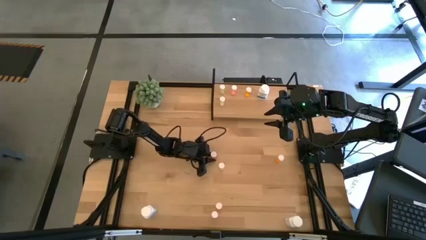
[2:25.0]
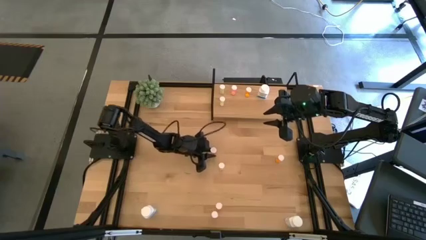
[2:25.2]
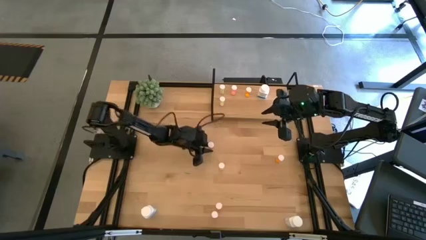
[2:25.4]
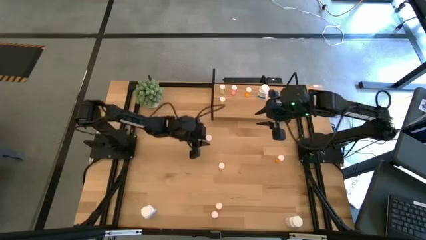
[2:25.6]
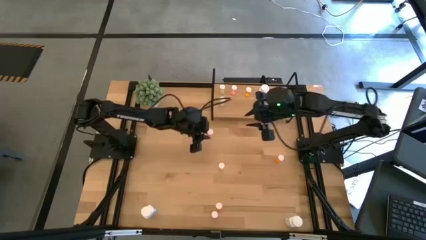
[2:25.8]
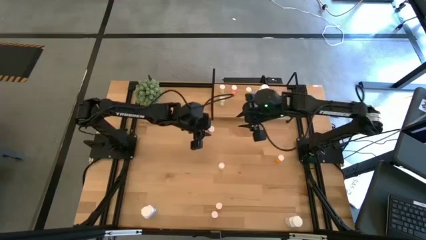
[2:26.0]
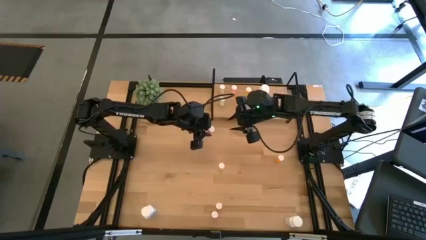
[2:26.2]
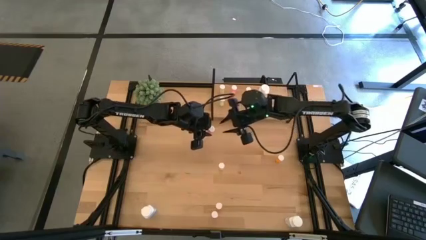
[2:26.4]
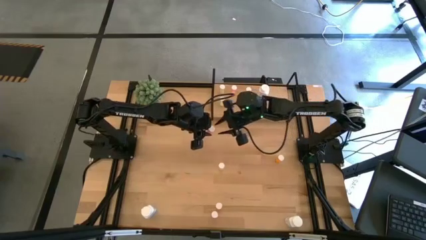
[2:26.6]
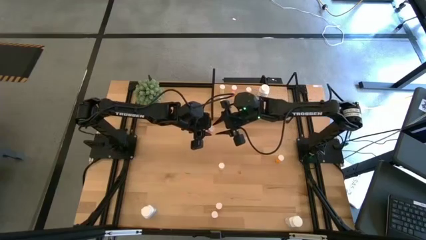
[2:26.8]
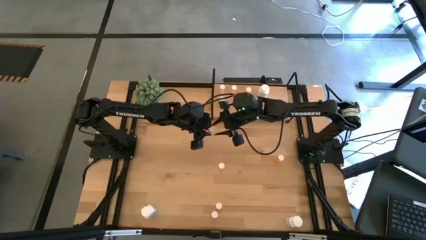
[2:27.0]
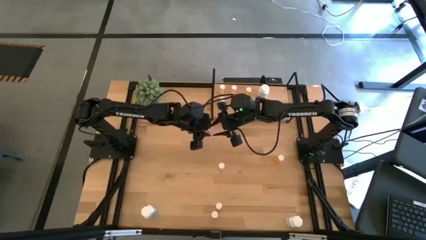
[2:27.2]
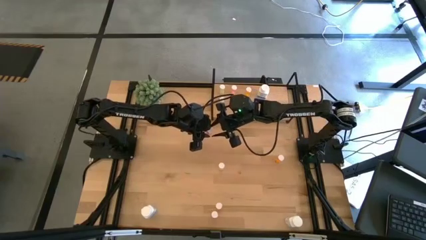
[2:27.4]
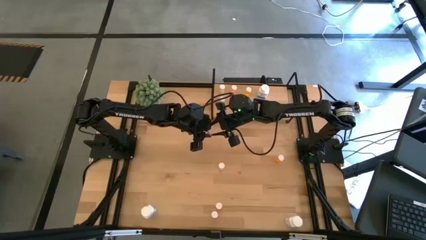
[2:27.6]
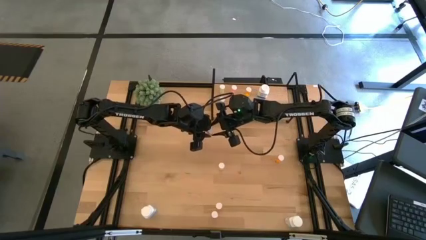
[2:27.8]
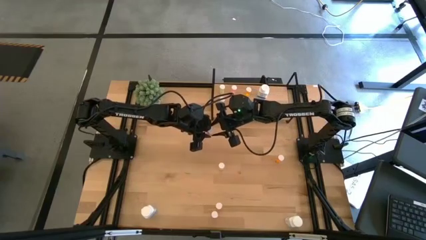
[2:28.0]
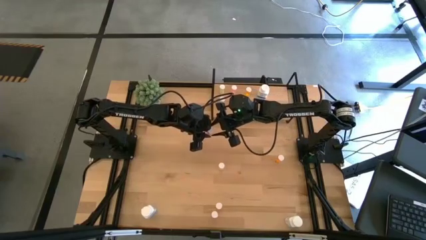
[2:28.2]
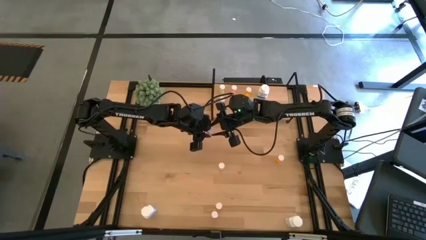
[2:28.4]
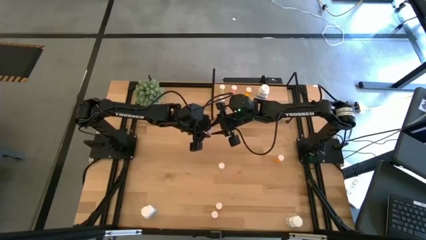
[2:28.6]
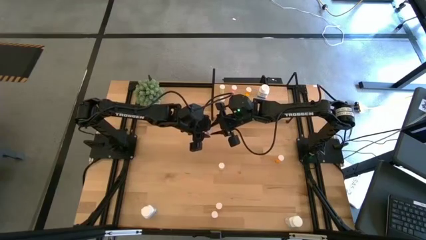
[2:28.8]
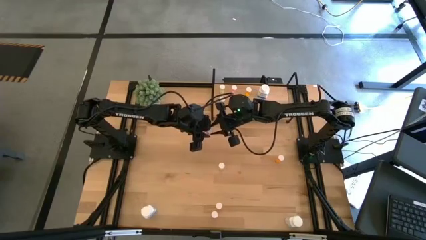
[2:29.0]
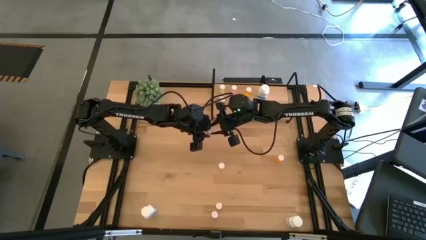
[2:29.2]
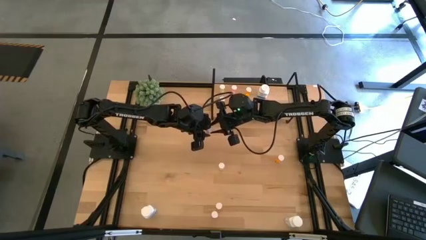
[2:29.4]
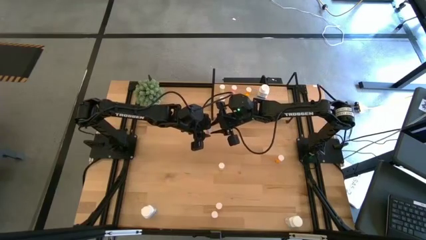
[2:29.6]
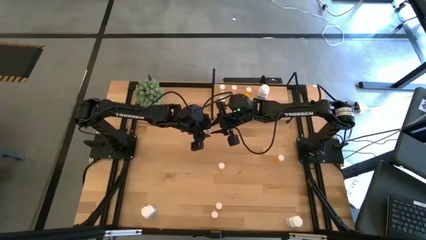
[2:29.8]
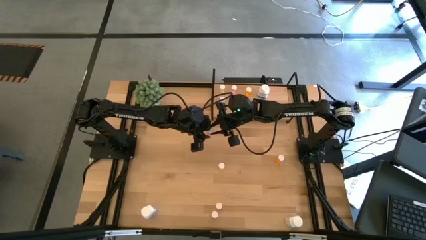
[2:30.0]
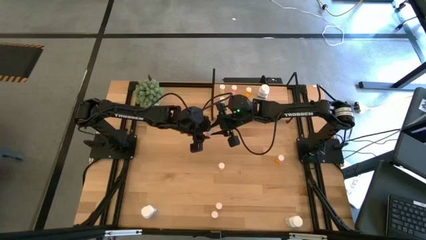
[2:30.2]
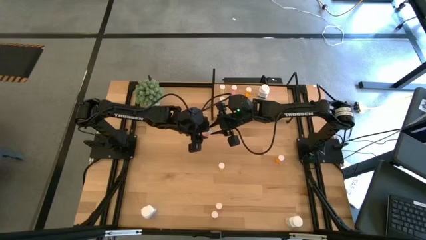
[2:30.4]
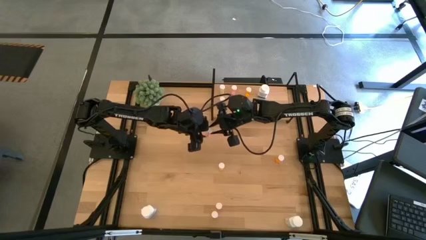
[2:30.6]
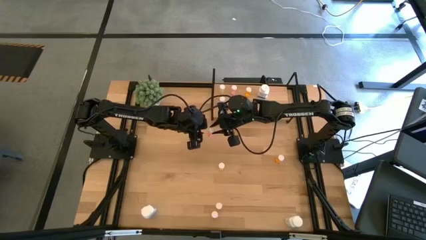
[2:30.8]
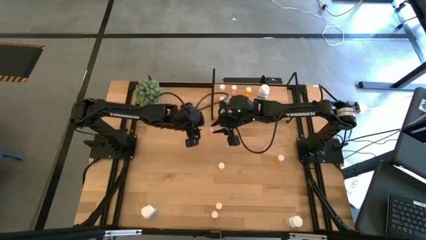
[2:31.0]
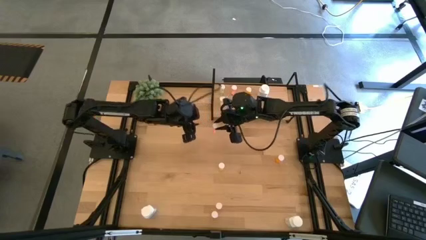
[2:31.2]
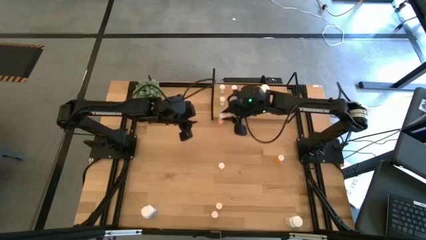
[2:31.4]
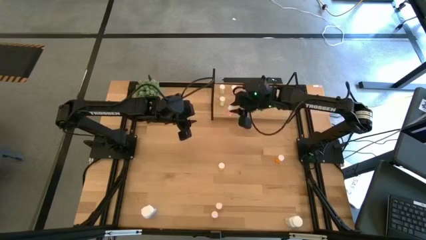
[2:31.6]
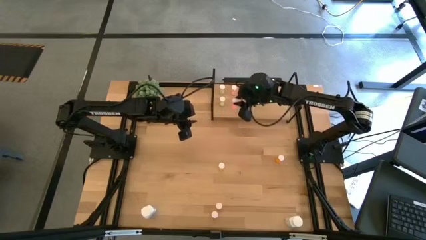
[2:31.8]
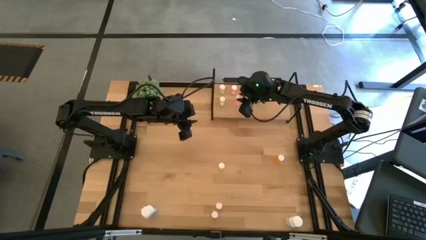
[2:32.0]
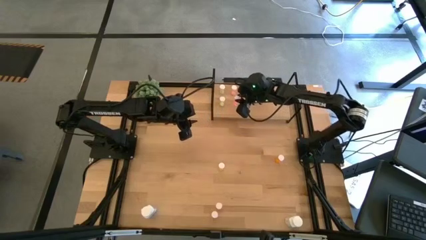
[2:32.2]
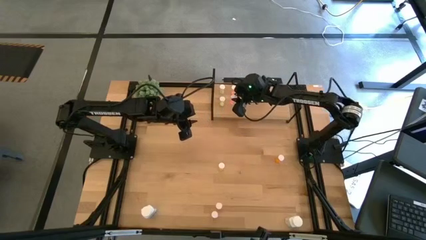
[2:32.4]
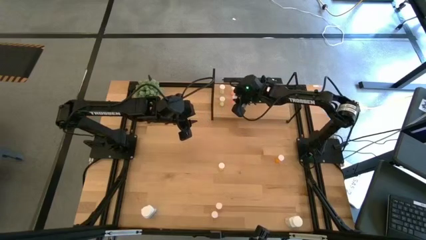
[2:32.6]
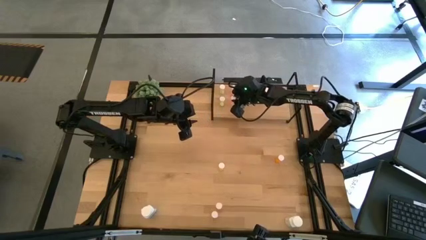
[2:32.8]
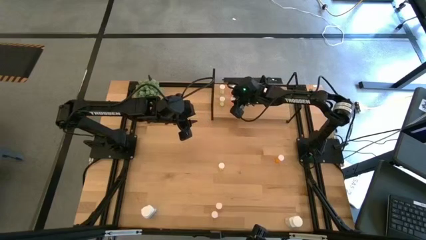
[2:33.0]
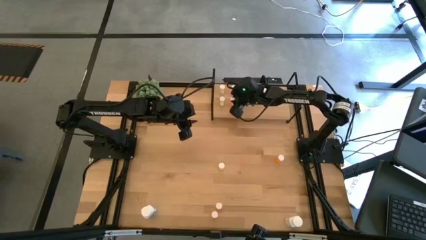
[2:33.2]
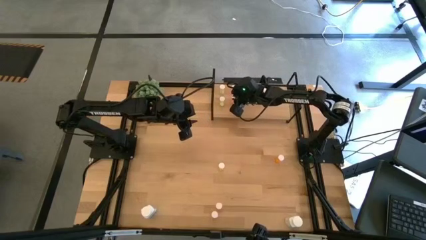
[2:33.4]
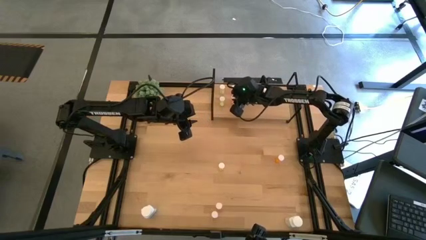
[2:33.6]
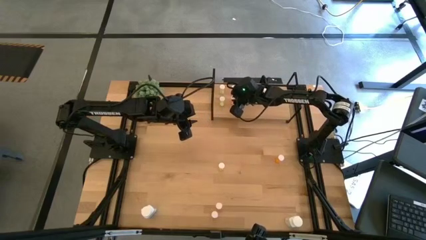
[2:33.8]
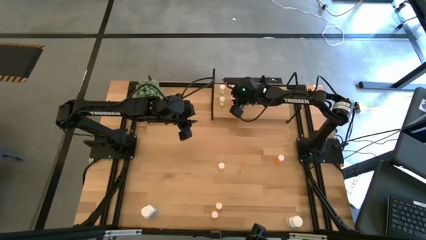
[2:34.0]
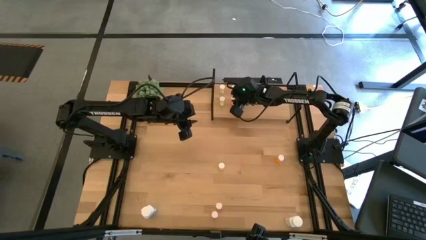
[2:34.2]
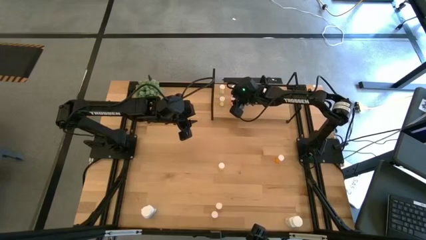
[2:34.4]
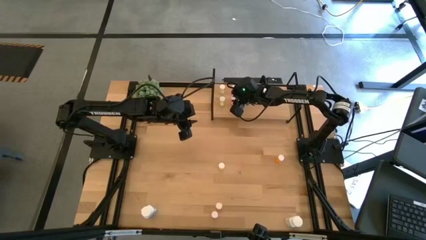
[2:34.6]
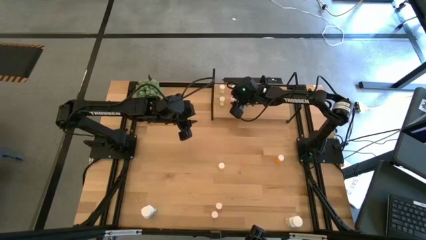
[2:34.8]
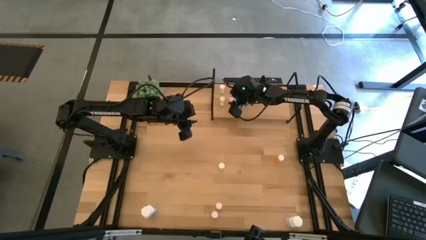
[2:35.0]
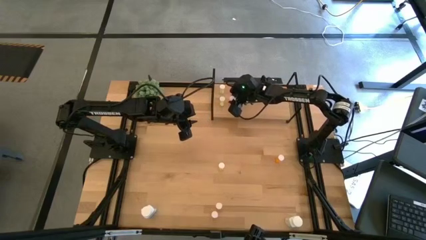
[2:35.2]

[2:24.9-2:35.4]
Task: Pick and place medicine bottles onto shelf by color
Put the top pink pill bottle on the shelf aligned with the other pink pill bottle

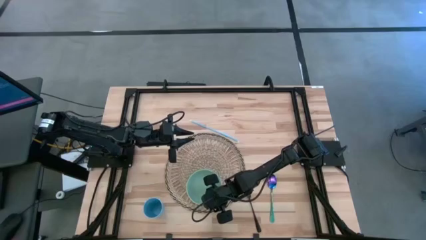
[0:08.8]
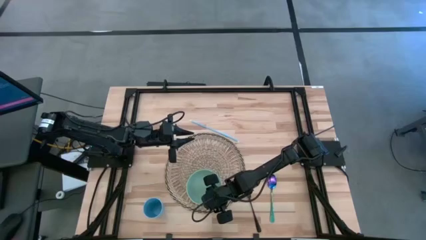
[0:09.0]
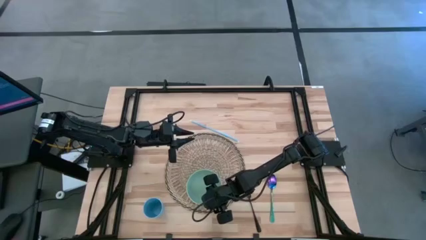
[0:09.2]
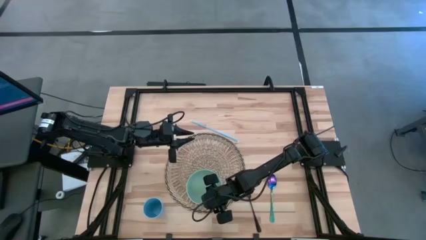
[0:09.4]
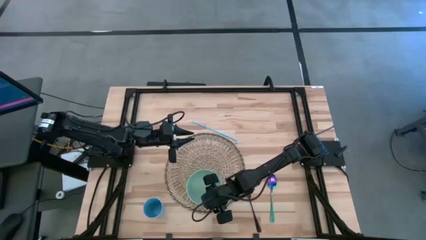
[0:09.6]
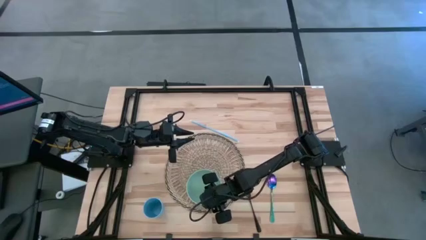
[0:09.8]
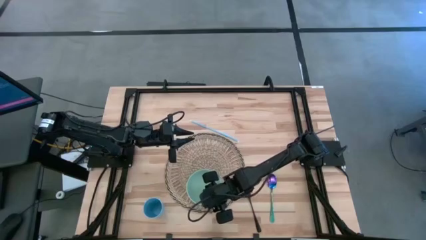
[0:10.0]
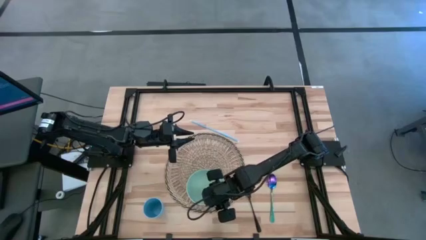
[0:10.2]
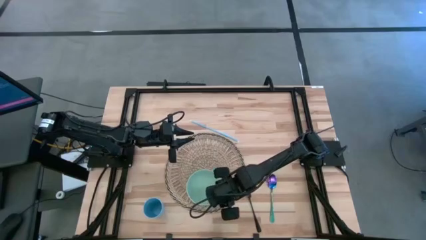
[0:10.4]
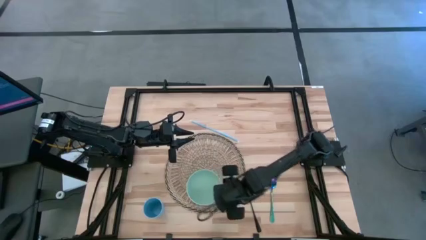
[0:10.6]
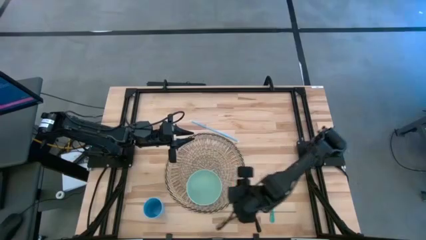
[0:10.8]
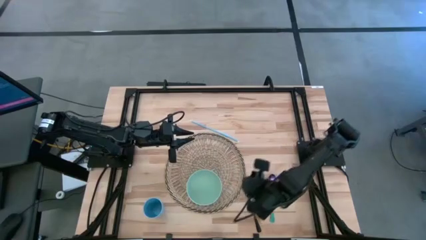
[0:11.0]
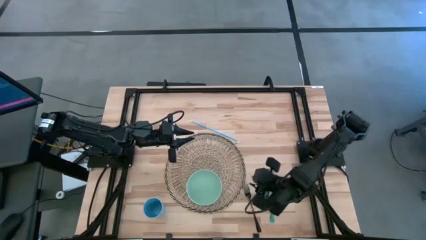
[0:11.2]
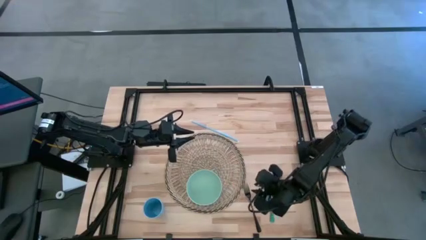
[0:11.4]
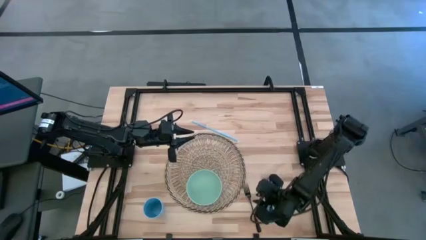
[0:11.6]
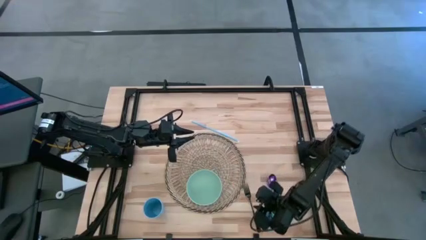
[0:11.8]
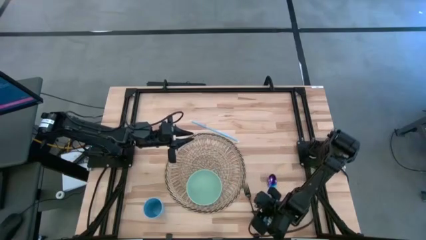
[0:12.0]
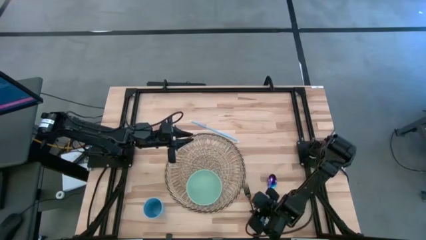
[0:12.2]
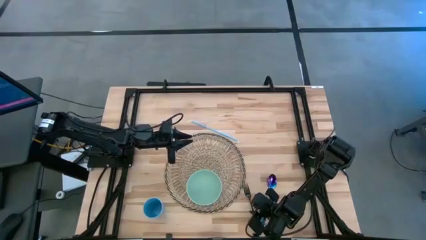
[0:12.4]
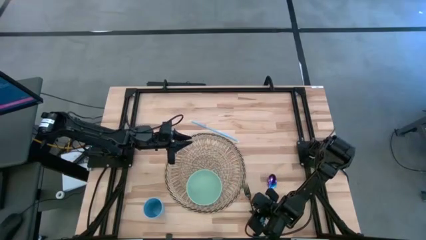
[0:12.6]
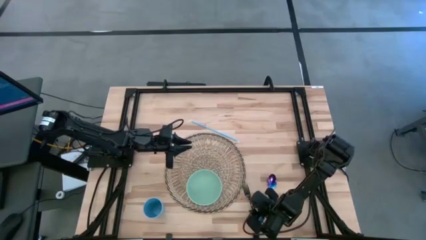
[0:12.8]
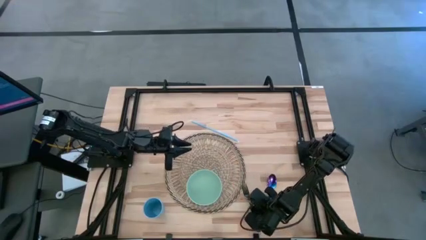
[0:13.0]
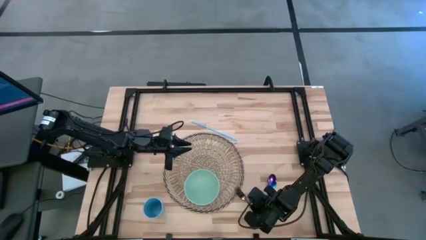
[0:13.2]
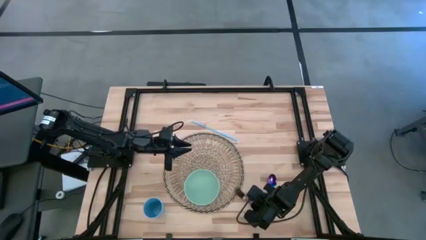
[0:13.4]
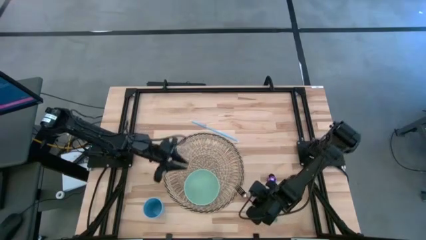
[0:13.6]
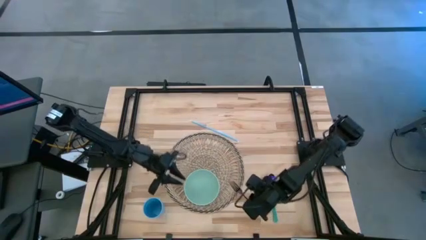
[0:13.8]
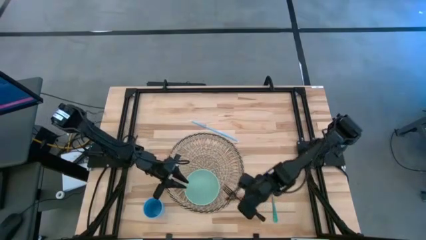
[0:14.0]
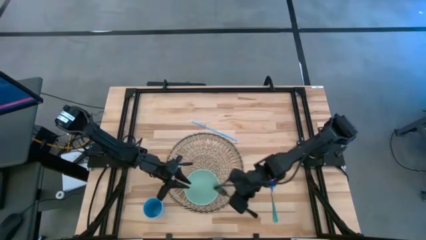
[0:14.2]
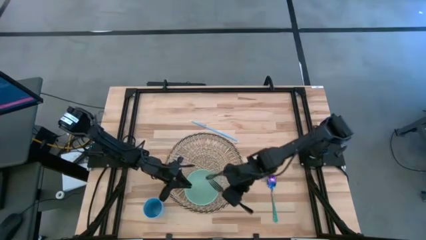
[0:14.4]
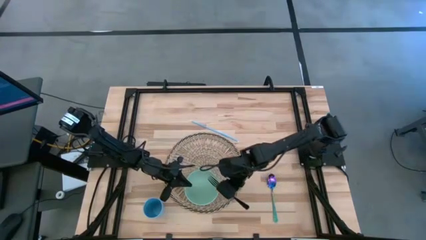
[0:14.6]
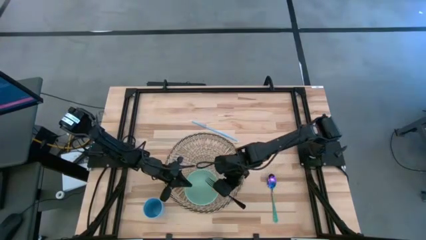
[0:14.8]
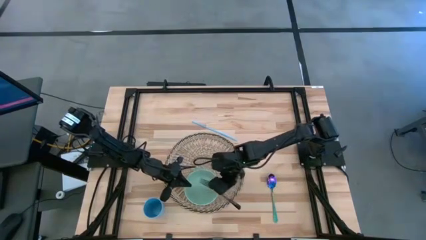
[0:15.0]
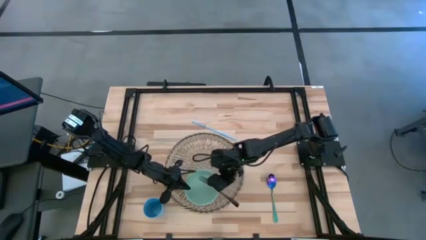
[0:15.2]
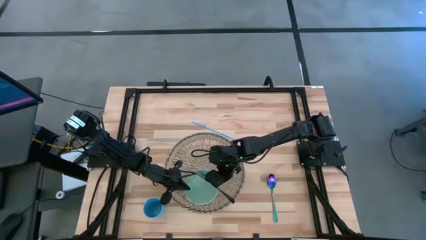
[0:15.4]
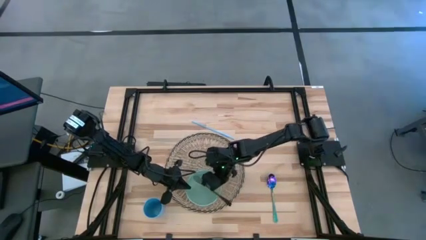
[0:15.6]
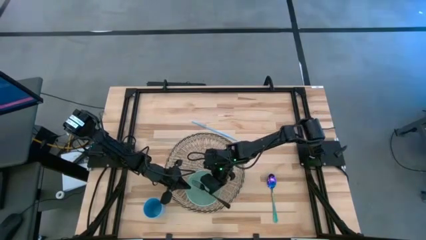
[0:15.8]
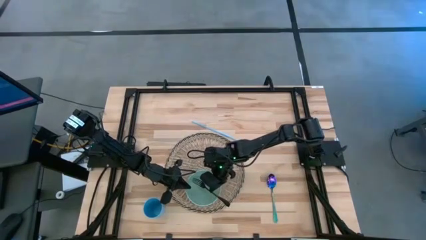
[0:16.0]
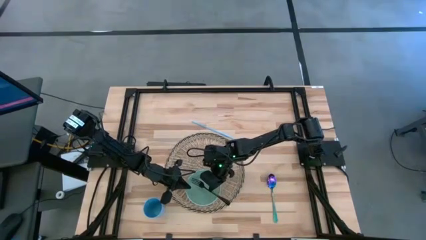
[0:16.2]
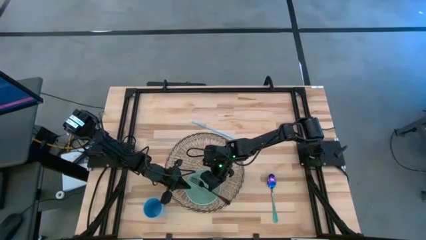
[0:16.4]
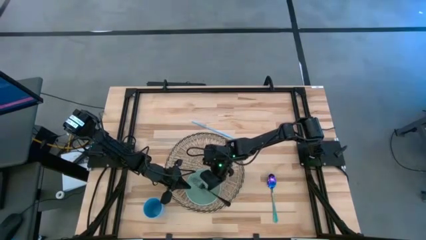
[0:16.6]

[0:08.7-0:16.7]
Task: Pick & Place Utensil
Put the black fork into the blue bowl on the brown mat
